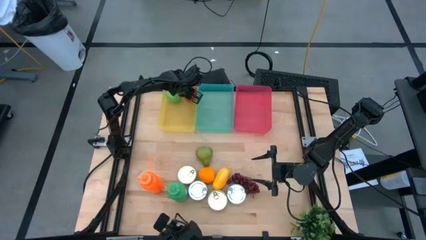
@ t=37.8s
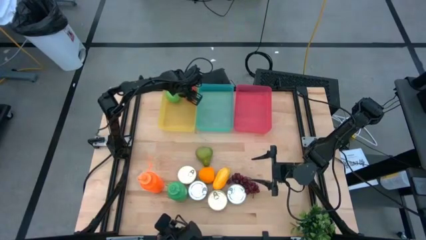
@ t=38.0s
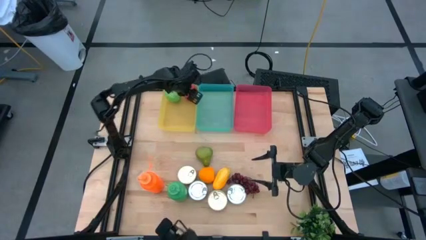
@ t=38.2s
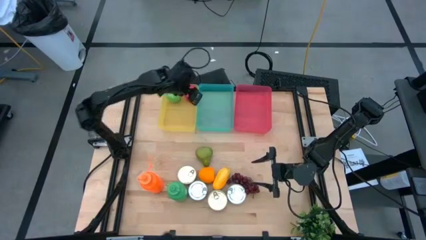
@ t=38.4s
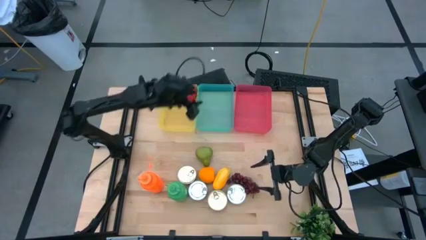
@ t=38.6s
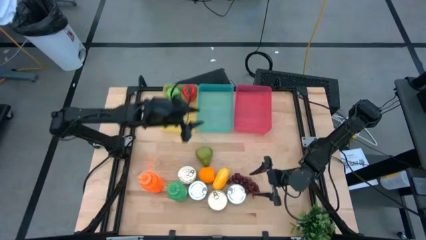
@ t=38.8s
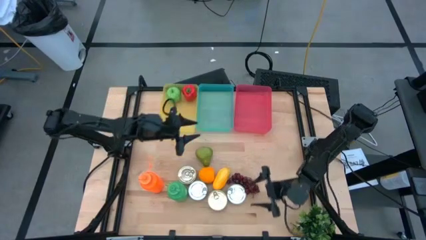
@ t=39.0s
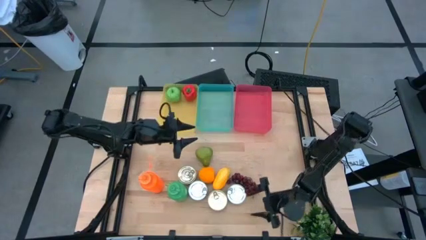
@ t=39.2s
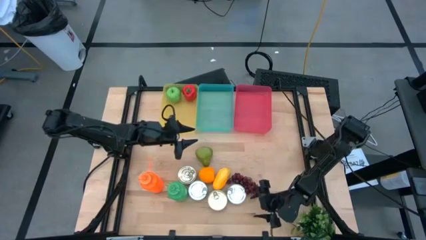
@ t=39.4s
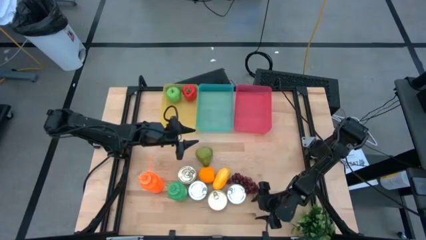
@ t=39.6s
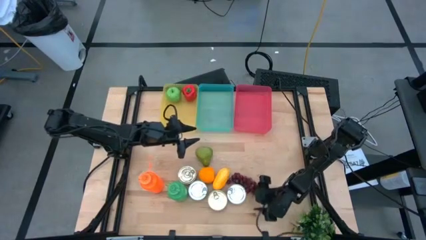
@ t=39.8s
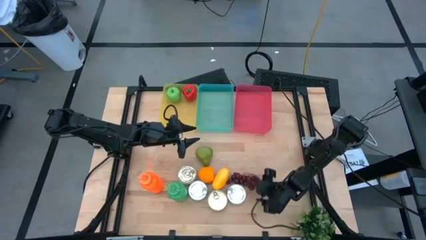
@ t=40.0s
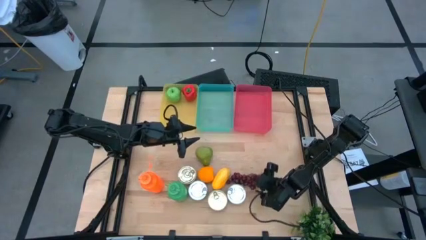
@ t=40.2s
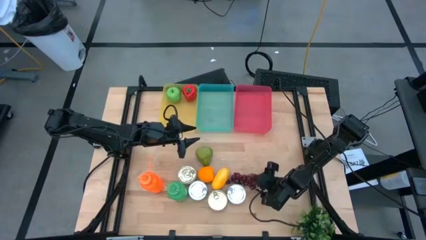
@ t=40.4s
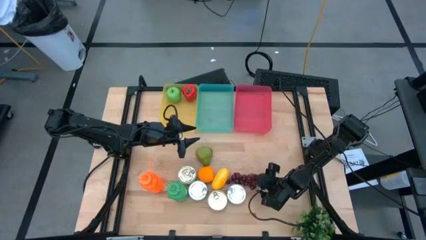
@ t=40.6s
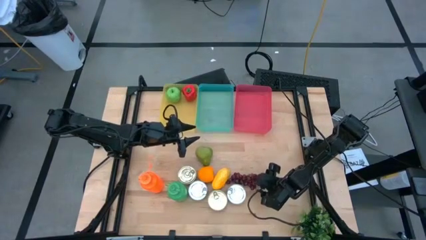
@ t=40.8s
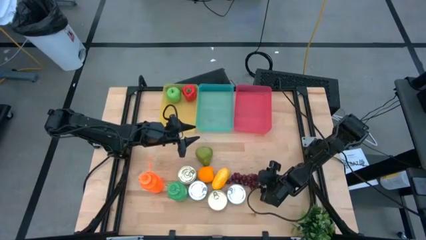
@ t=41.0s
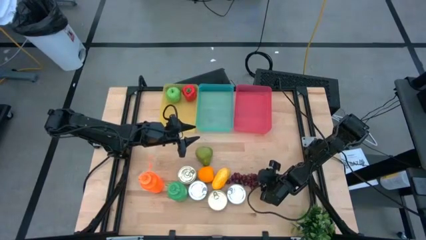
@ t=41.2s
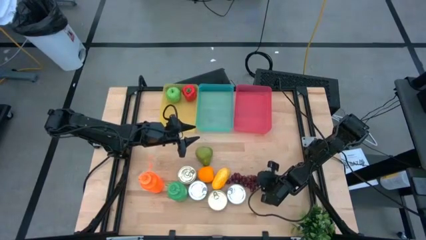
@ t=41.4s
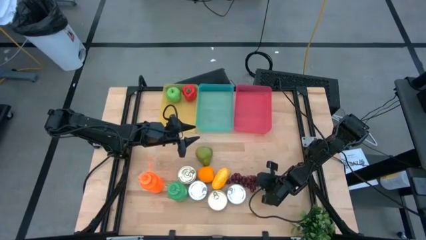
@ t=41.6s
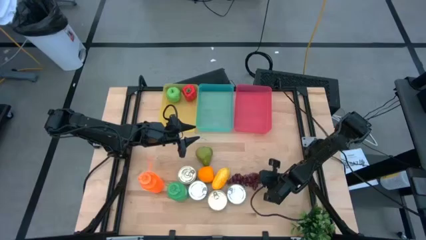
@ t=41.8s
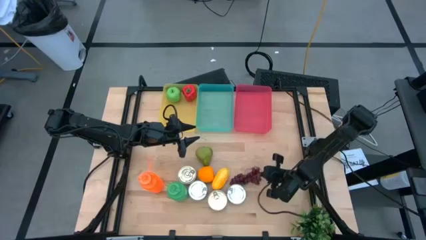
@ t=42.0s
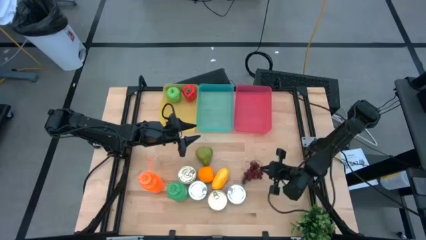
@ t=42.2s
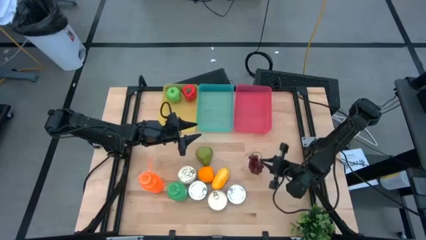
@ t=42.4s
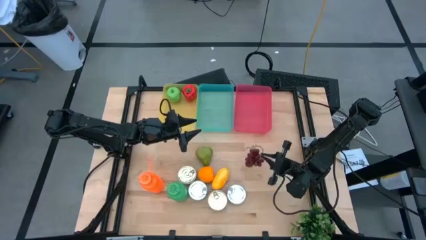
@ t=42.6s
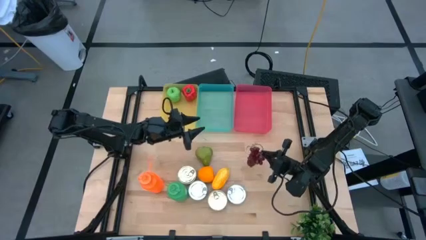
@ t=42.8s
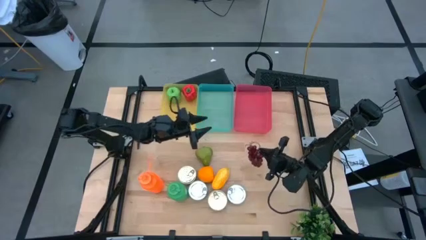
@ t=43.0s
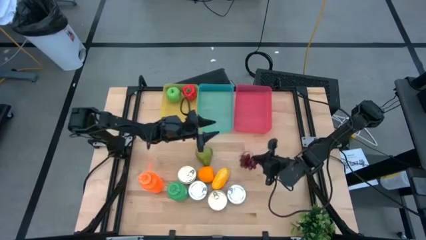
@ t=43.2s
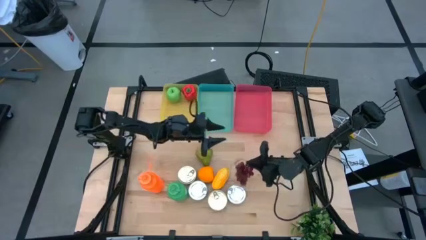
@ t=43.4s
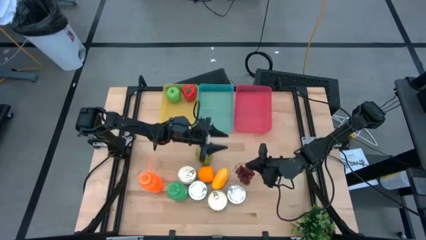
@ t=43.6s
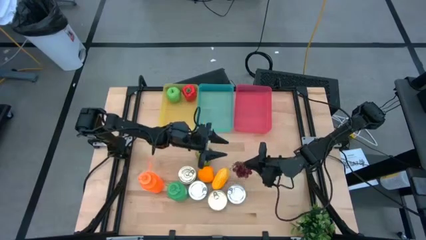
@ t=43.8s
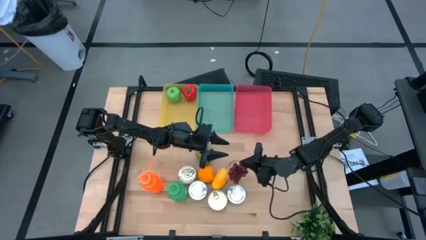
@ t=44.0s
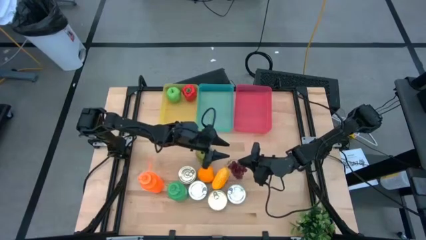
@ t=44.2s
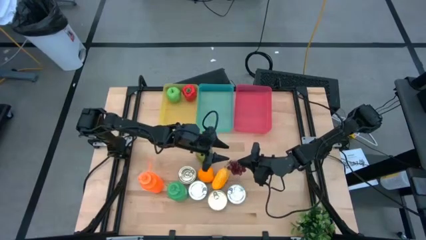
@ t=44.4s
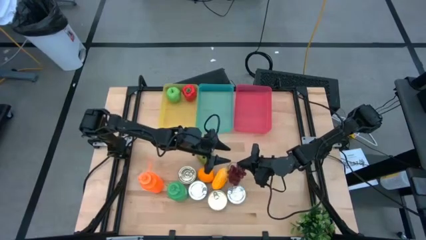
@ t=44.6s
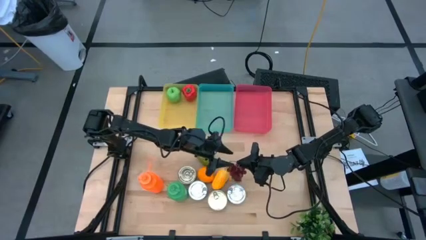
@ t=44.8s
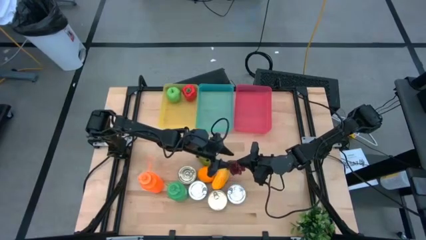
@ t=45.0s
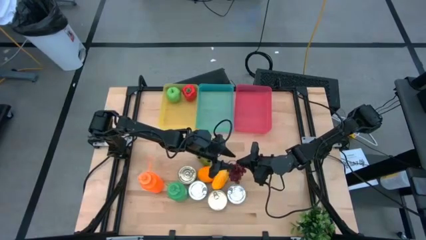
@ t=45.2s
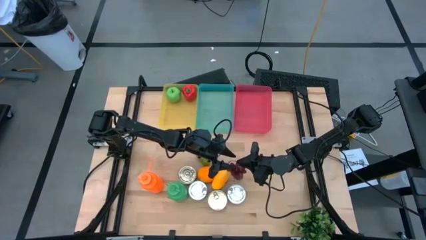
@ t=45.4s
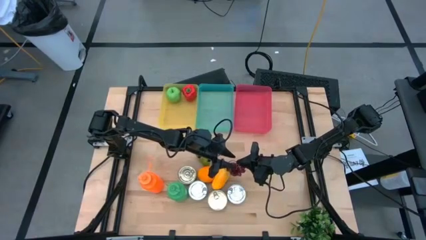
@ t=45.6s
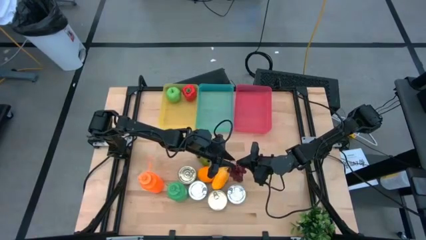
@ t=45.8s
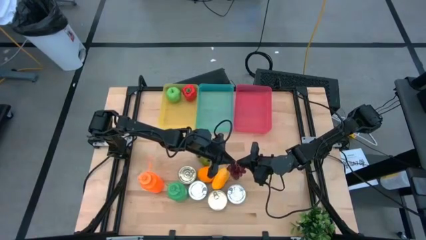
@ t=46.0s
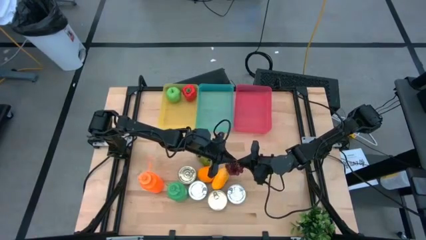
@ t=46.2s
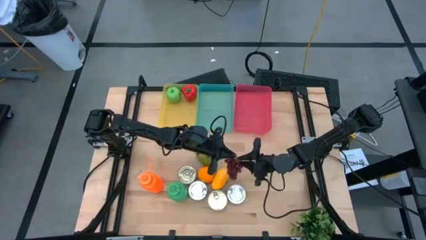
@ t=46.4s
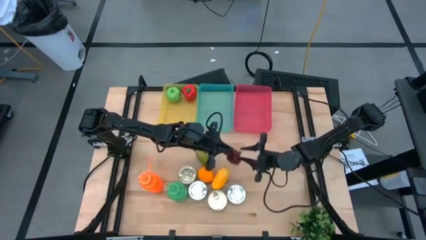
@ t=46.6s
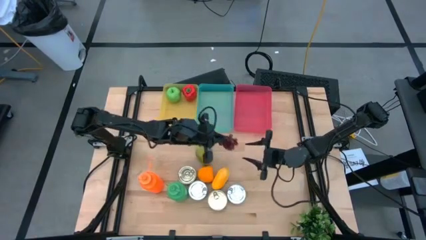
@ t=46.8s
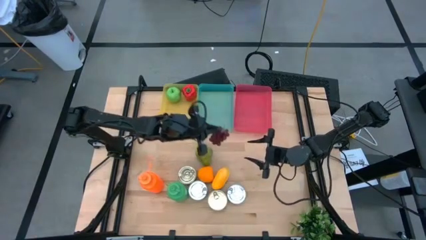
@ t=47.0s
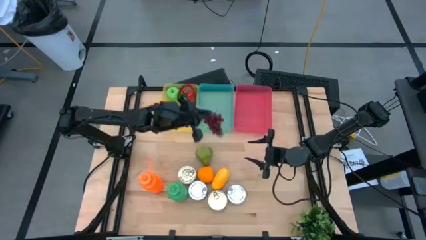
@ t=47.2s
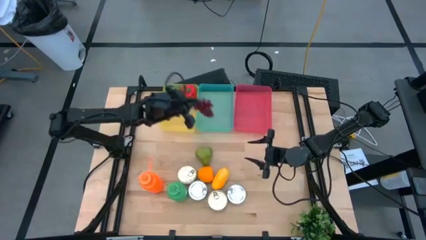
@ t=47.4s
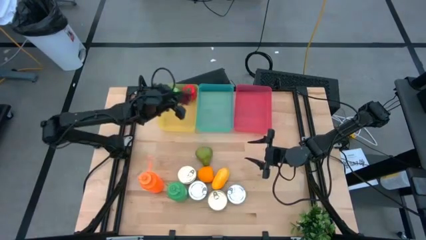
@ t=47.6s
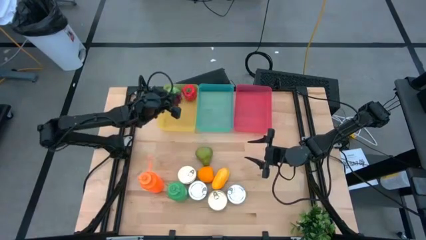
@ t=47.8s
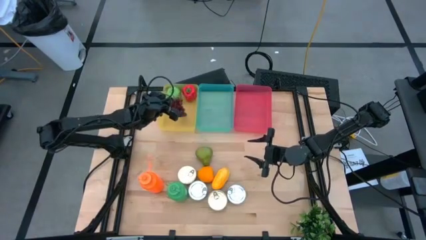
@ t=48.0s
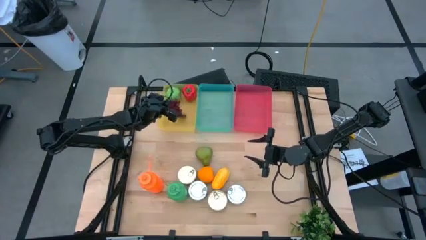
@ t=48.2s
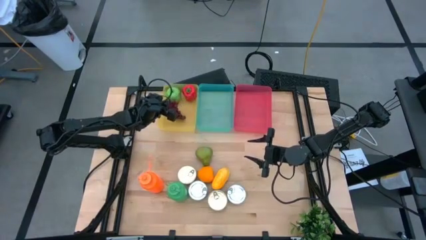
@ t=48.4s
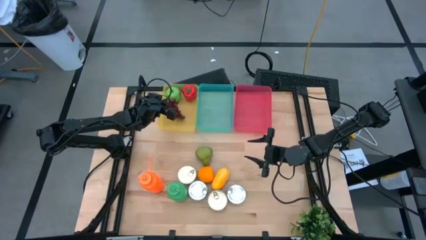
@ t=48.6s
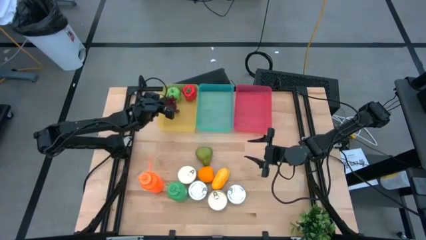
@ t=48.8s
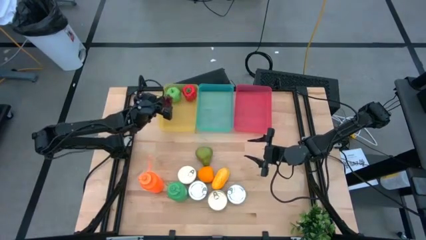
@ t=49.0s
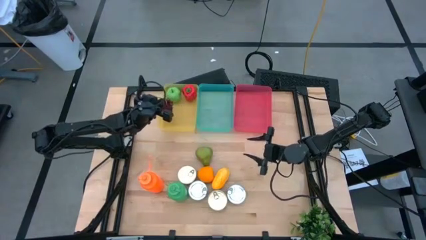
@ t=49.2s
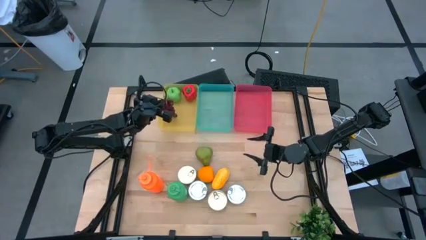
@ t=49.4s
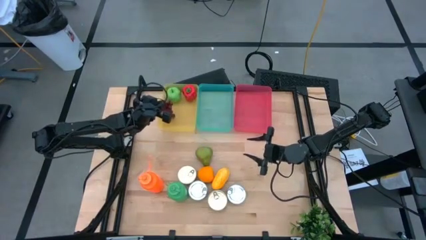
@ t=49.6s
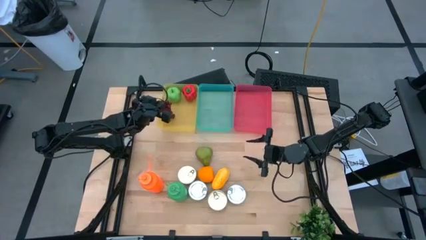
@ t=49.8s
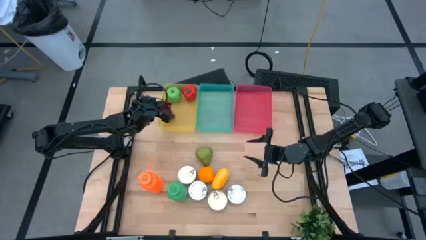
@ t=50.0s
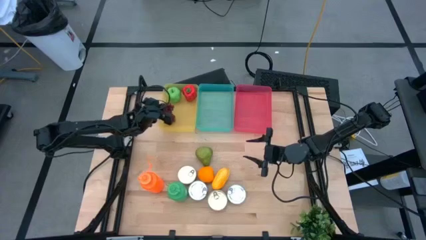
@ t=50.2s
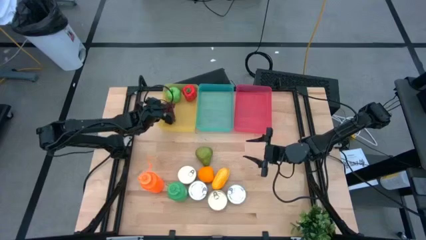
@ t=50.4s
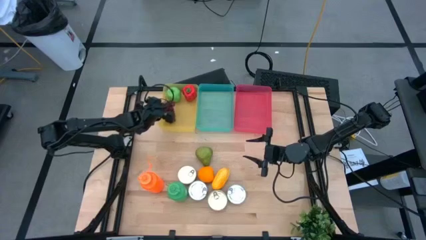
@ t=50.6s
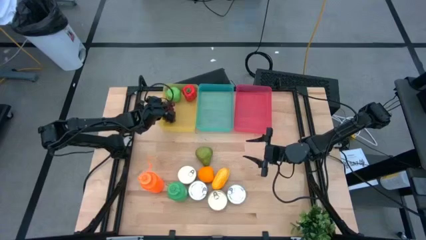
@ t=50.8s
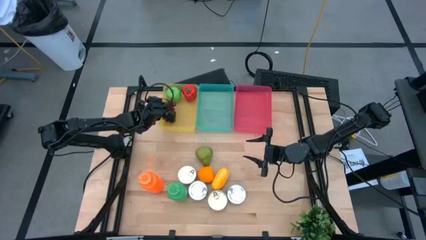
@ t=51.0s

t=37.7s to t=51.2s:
Task: Pick & Place Food Item
Put the red grapes into the yellow bin
